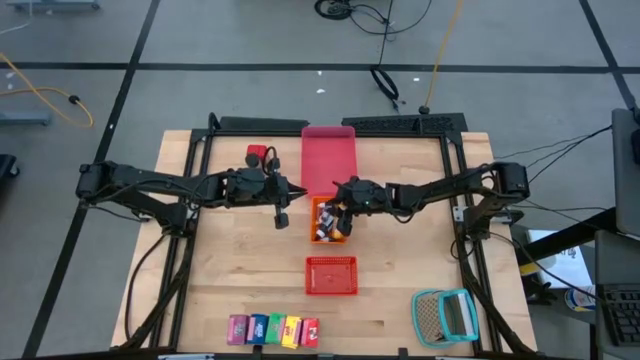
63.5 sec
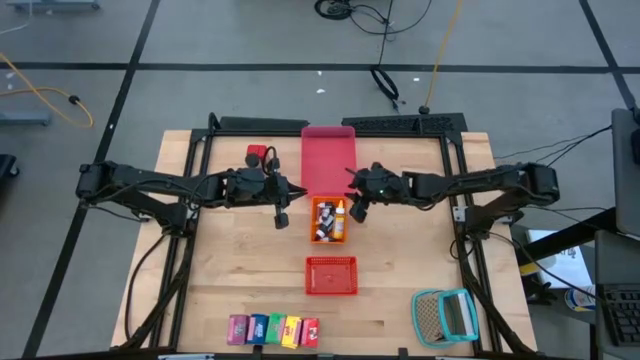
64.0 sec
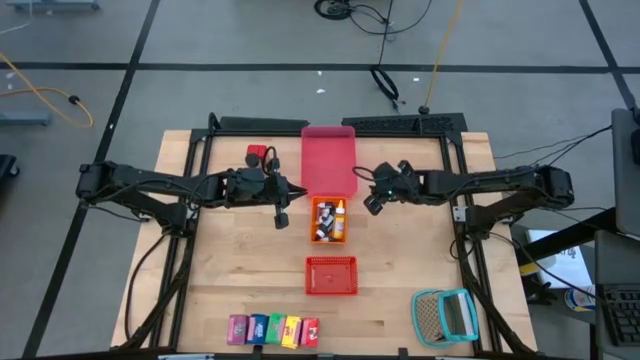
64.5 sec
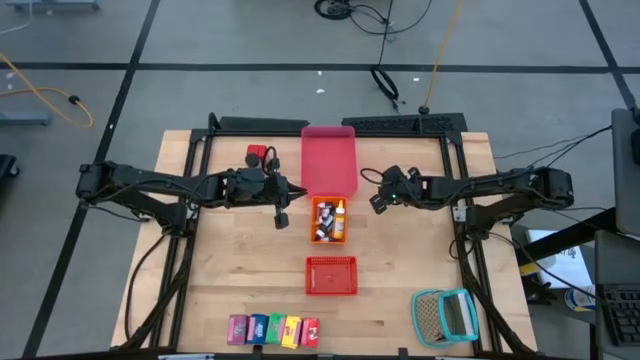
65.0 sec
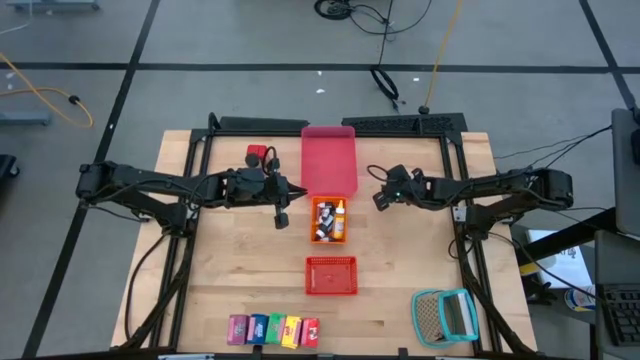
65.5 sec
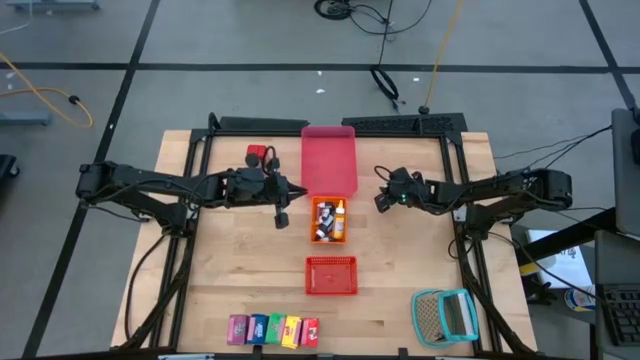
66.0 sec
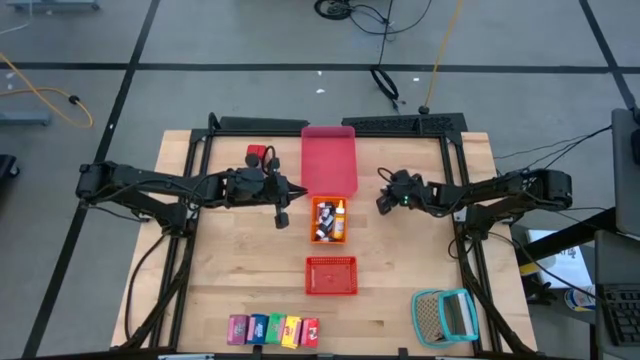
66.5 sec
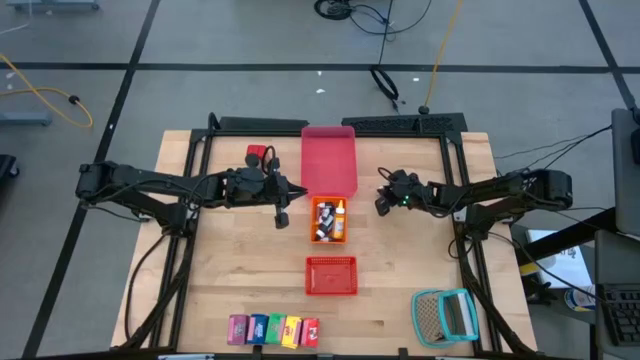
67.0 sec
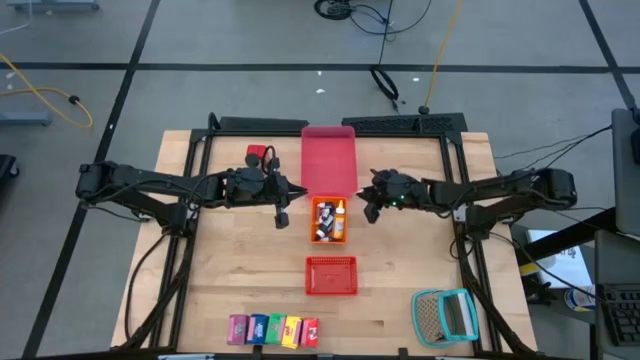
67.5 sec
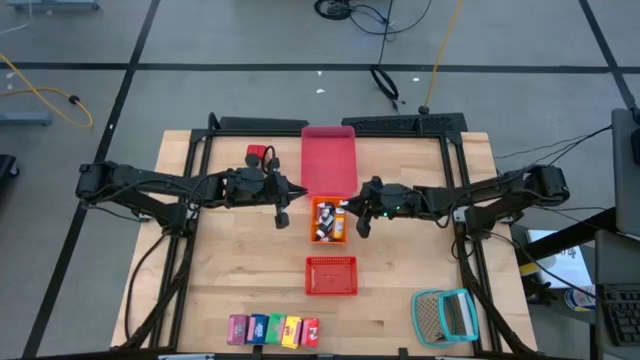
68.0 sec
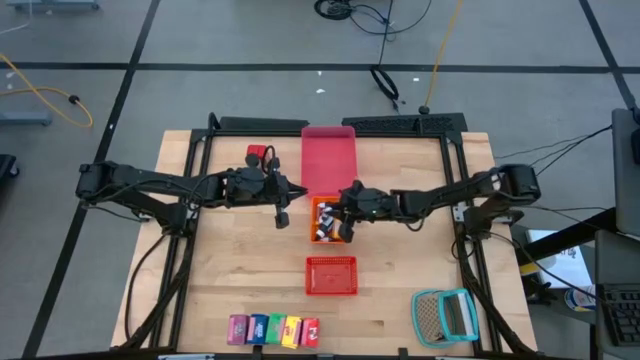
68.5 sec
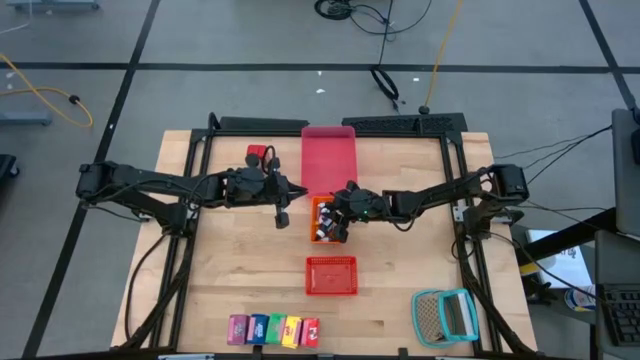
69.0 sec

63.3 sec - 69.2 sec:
Task: Pick & Place Kitchen Items
Put the small brown food coloring bottle into the orange basket

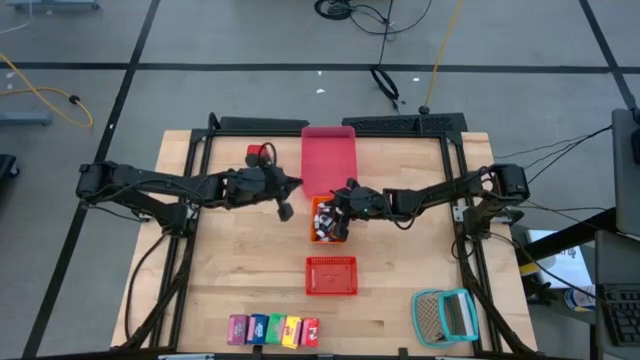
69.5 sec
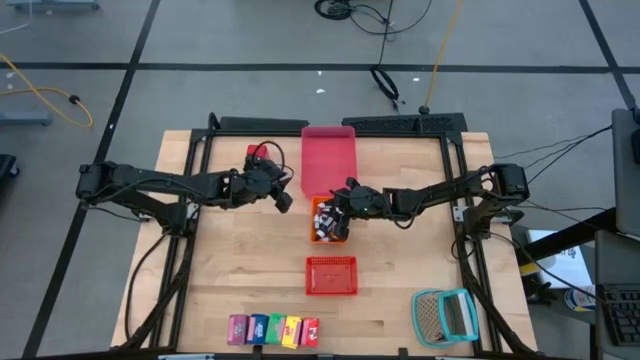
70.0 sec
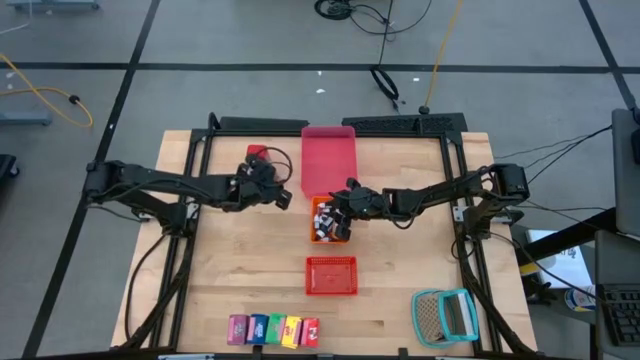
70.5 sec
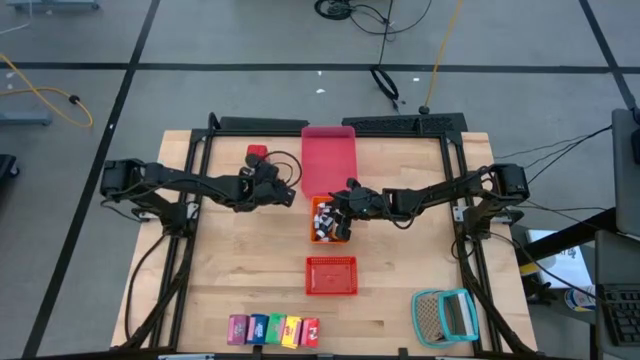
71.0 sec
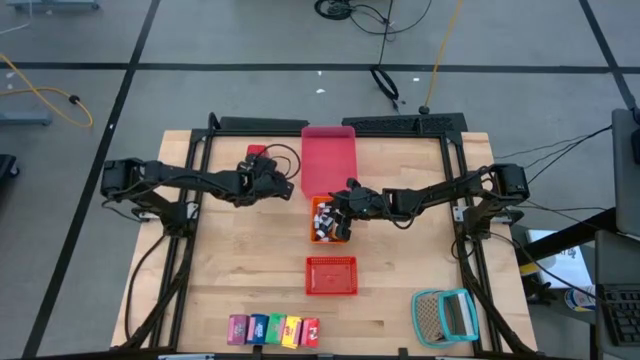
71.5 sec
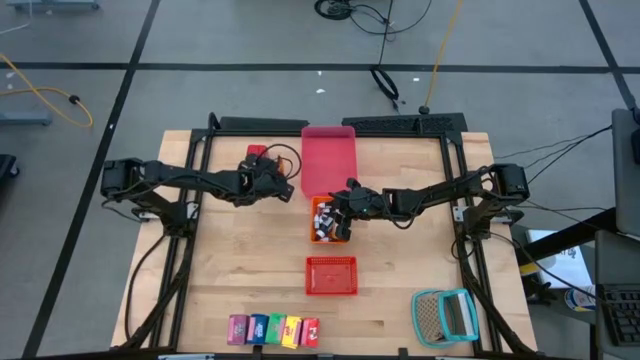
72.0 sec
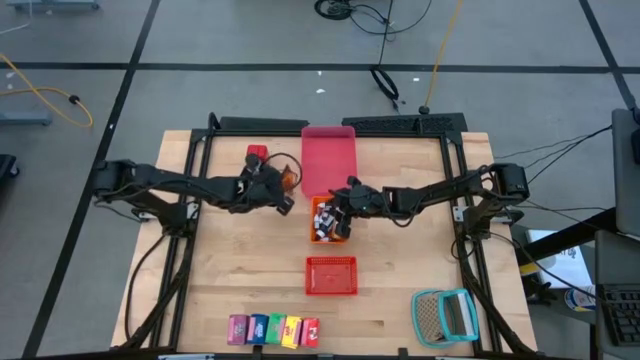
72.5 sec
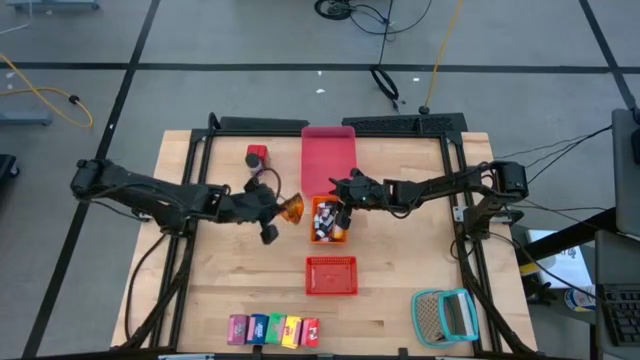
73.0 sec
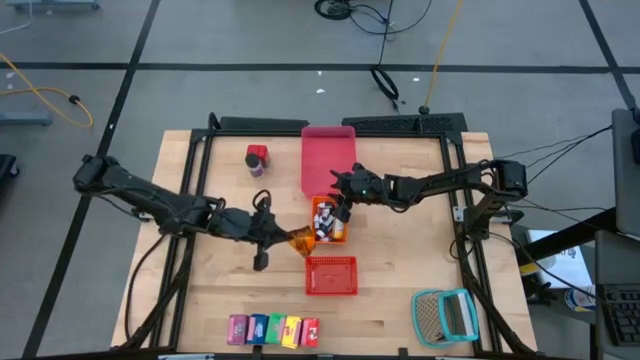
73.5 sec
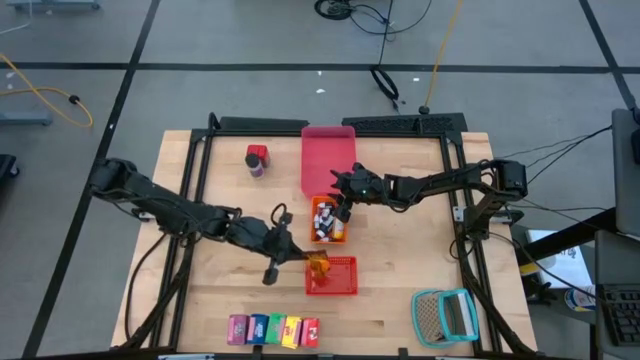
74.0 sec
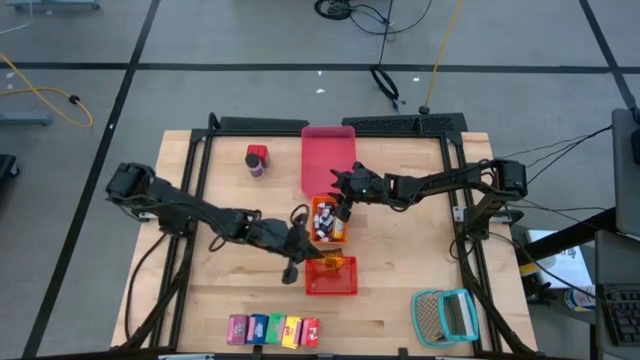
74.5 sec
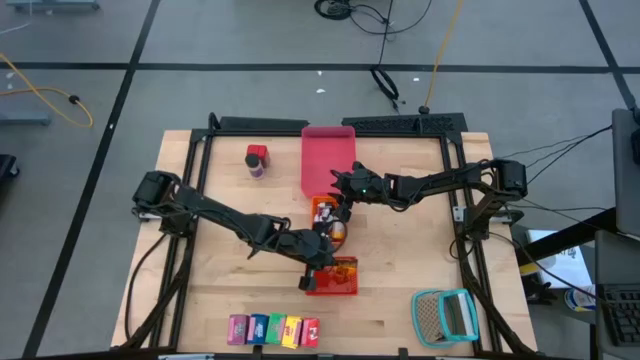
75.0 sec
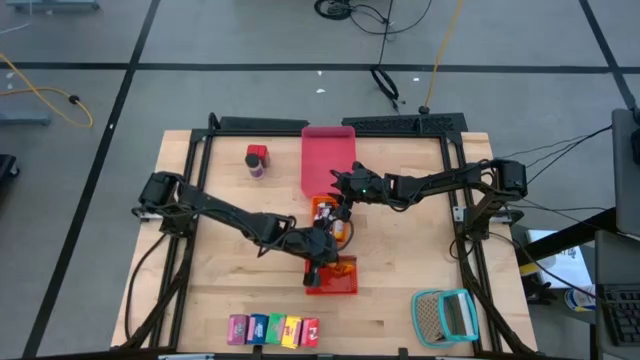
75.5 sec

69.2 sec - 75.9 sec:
Put the orange seasoning pack into the red basket

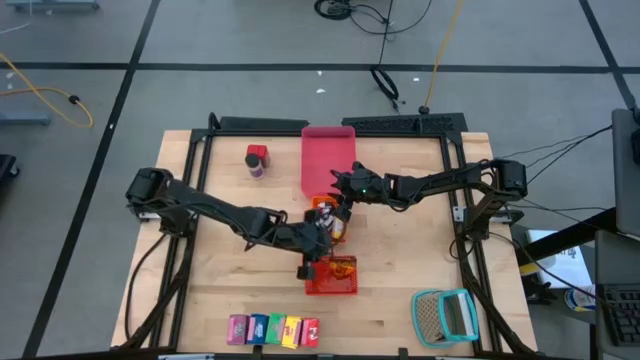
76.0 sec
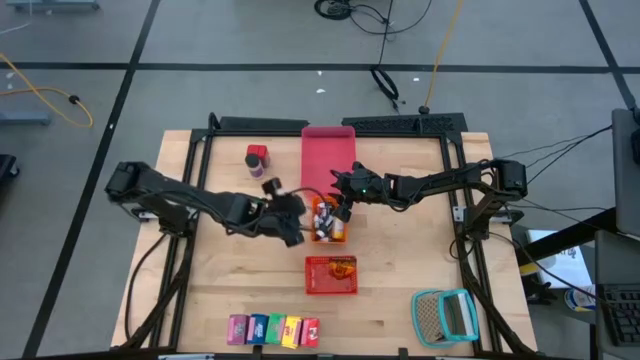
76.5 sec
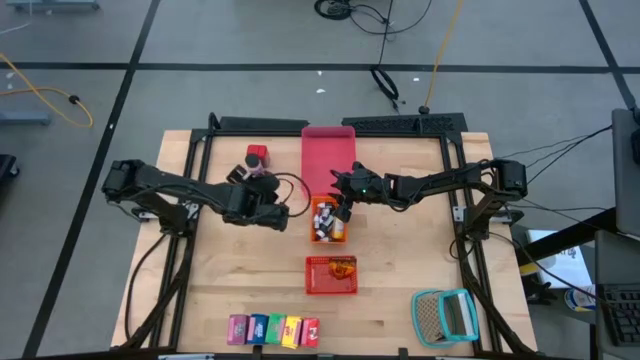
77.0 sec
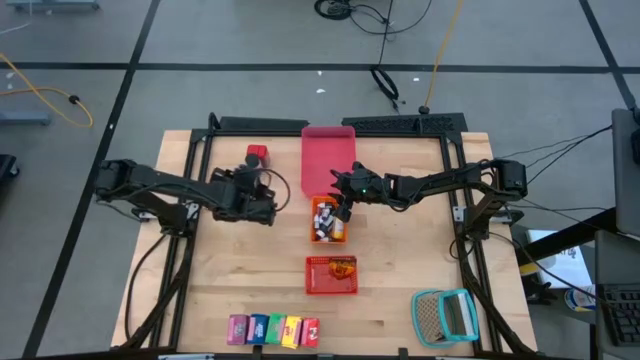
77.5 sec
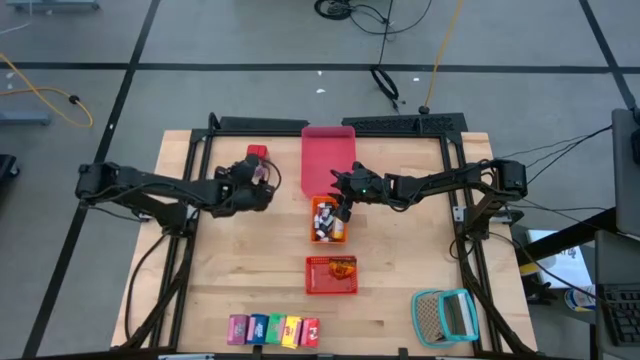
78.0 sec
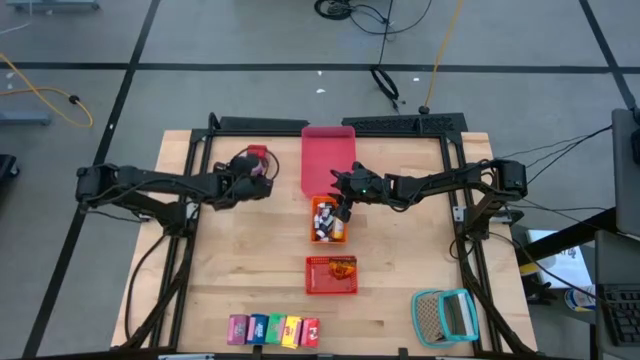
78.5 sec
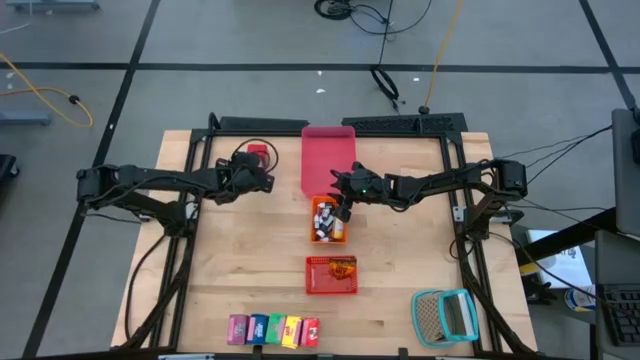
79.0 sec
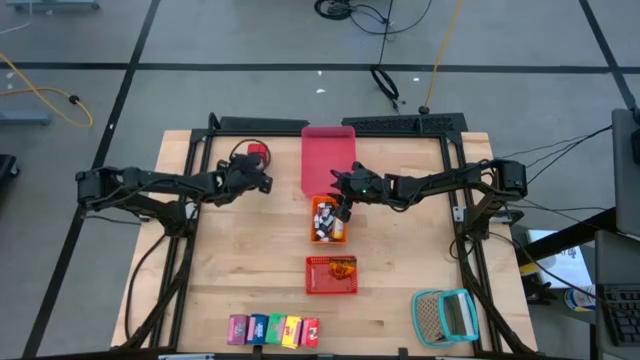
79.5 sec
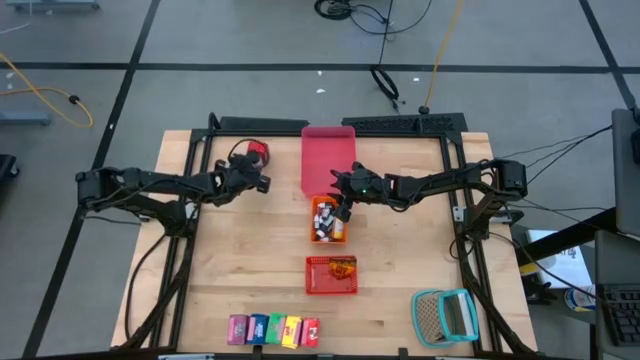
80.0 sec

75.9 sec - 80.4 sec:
Put the black seasoning bottle into the red basket

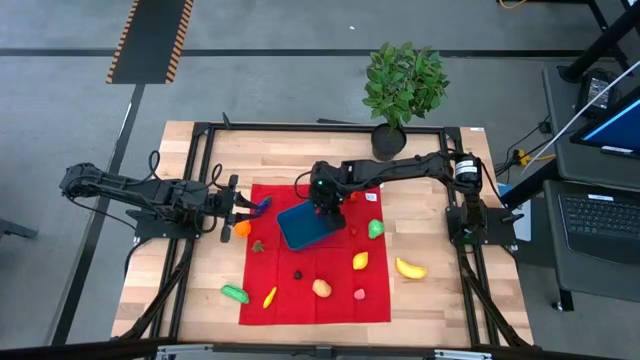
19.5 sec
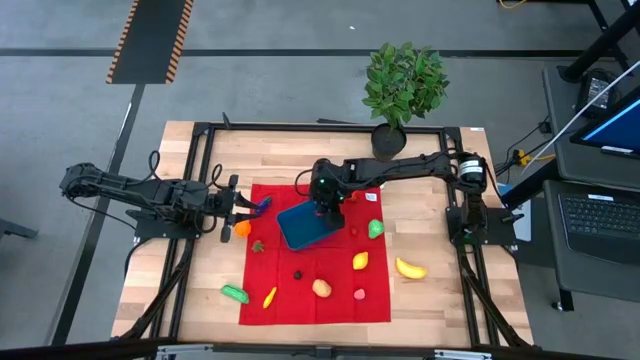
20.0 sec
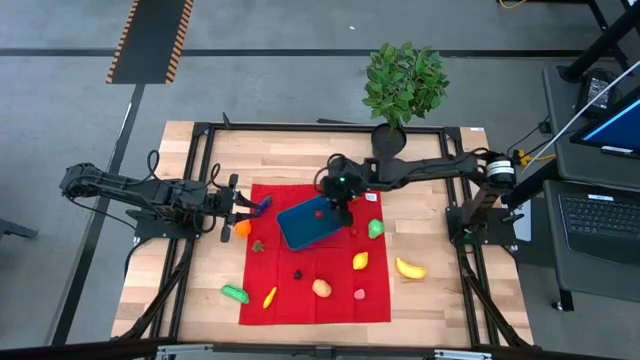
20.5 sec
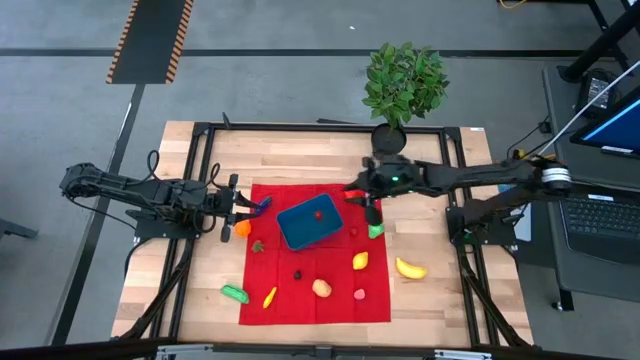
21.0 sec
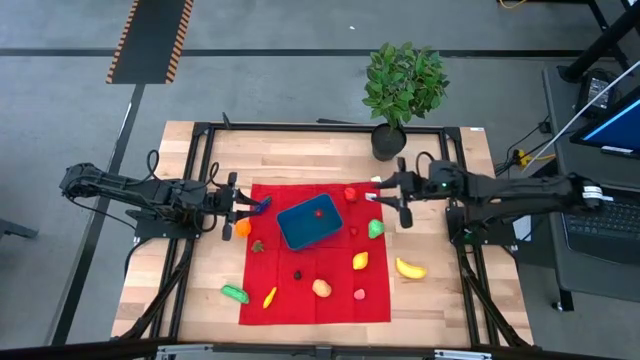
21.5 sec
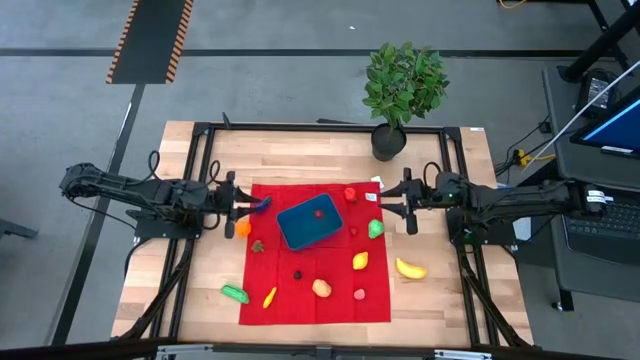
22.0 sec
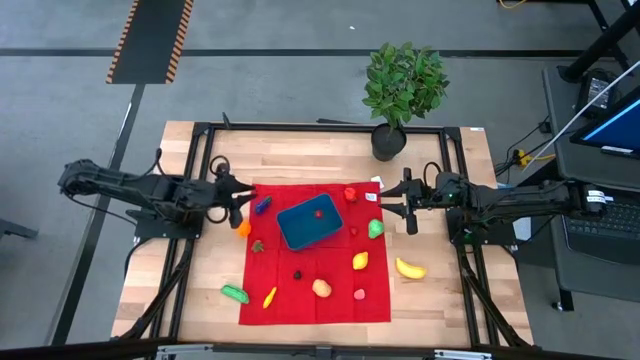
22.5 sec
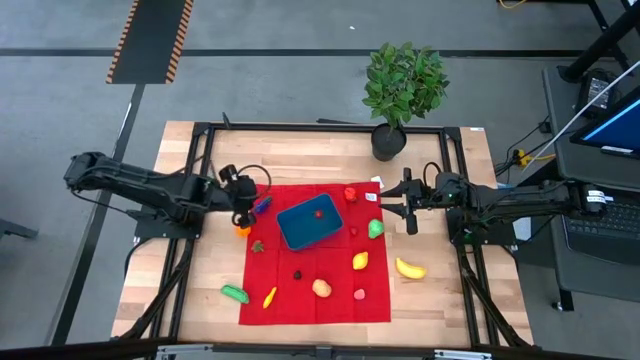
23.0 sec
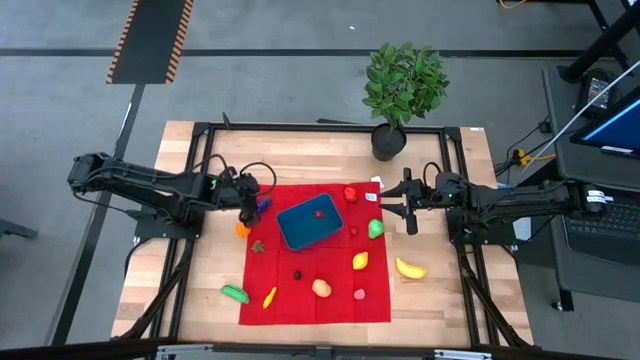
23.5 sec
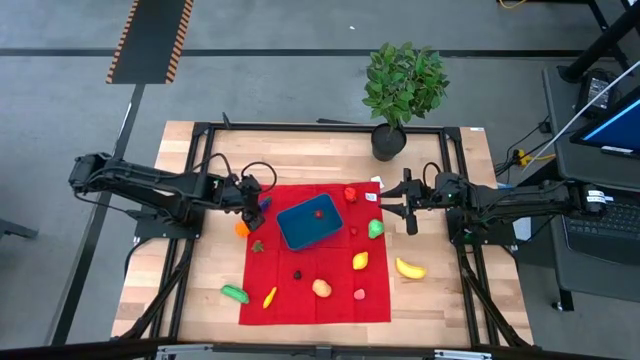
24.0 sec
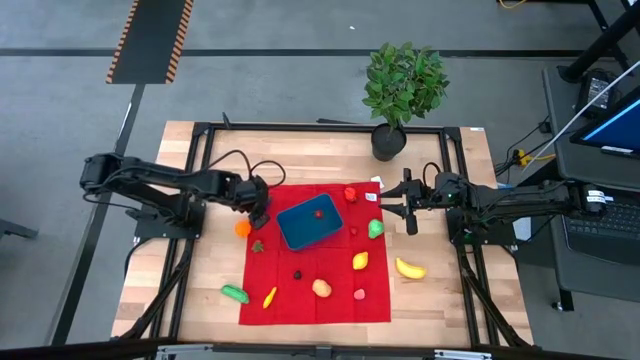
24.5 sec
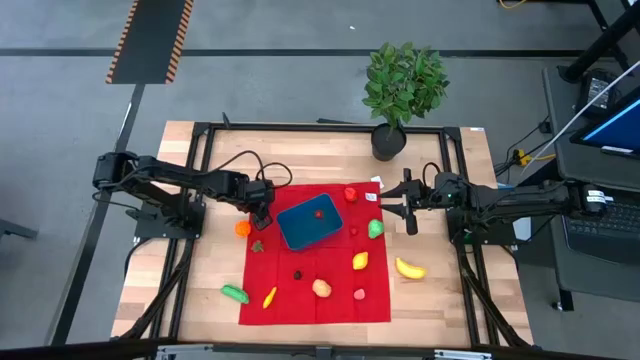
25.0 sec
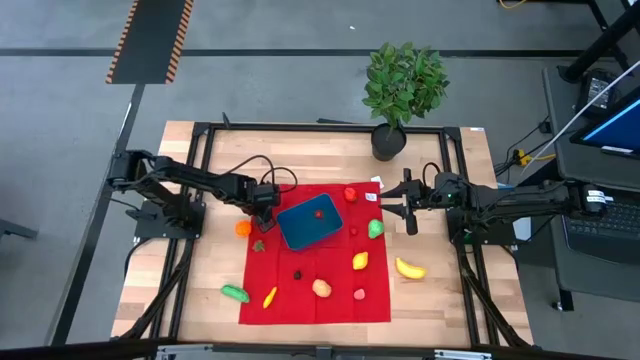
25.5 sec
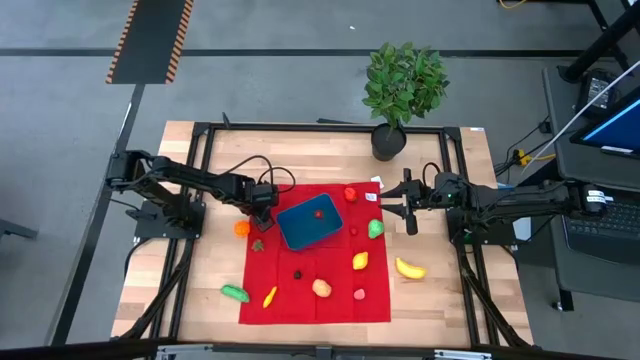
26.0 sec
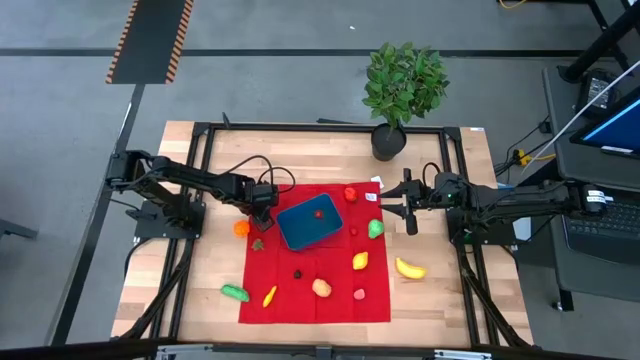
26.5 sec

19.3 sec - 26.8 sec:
Task: Pick and placing Produce into tupperware
Put the eggplant into the blue bin
